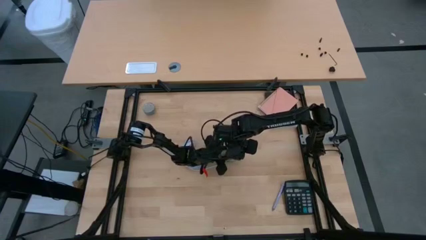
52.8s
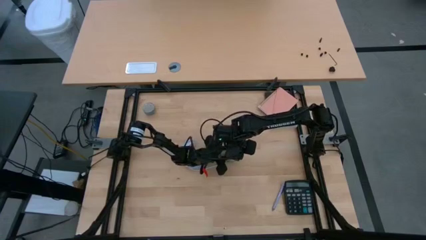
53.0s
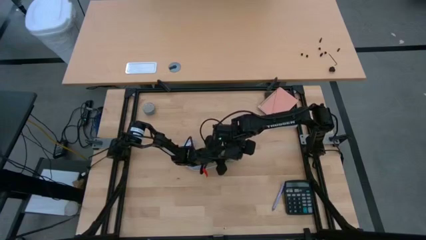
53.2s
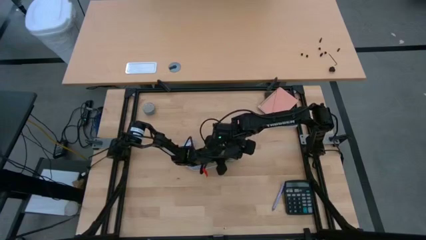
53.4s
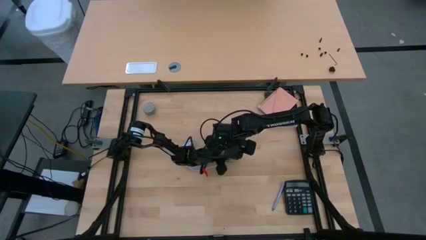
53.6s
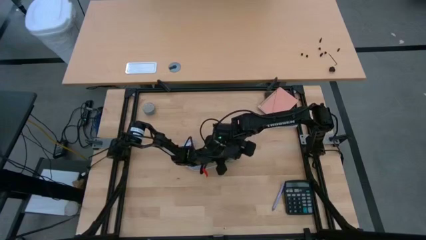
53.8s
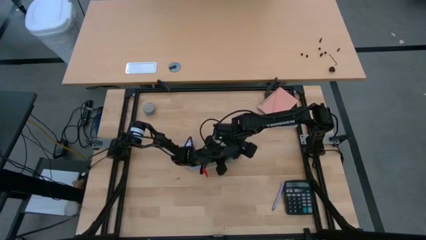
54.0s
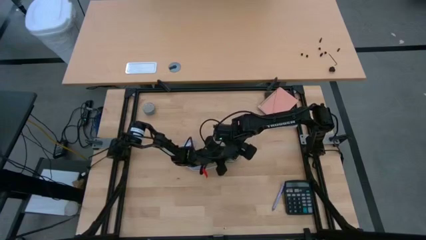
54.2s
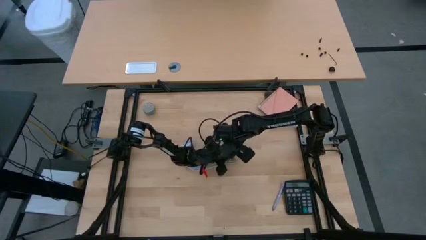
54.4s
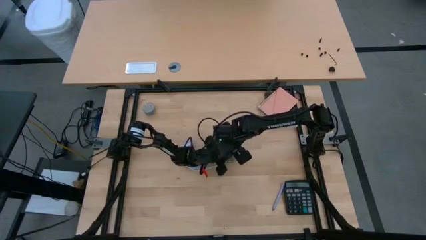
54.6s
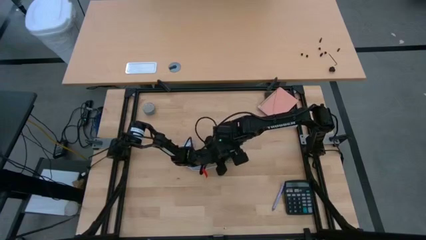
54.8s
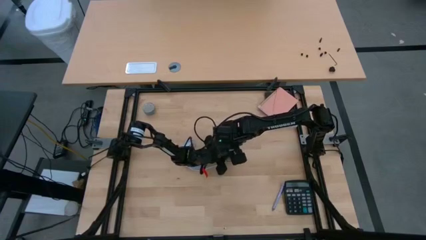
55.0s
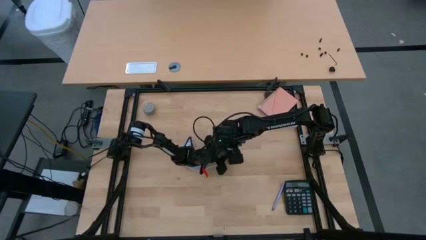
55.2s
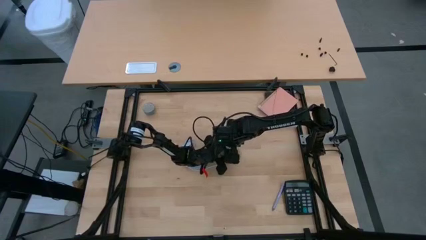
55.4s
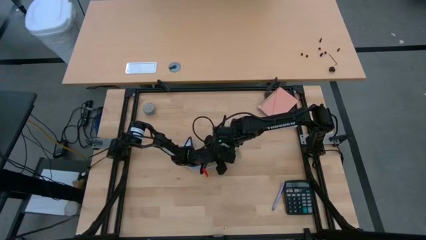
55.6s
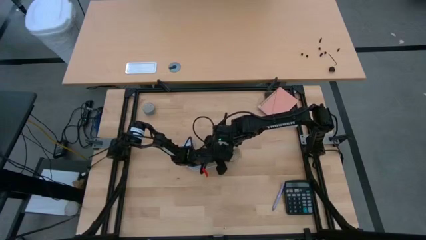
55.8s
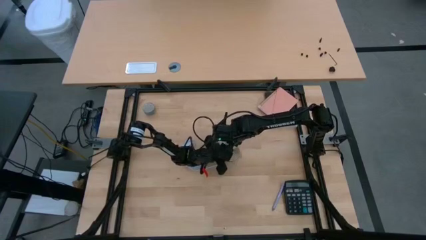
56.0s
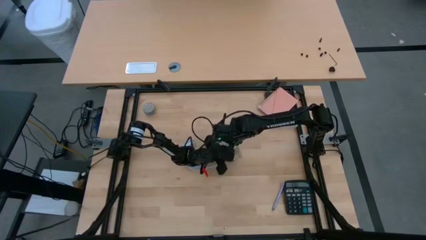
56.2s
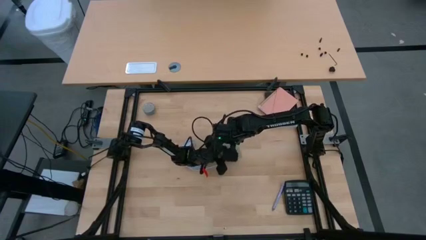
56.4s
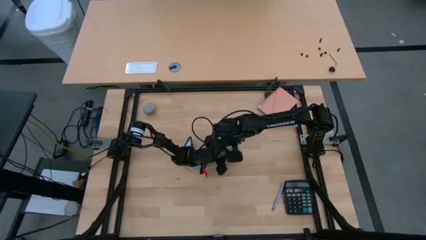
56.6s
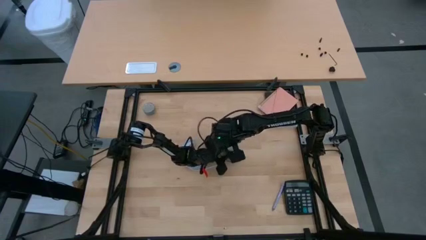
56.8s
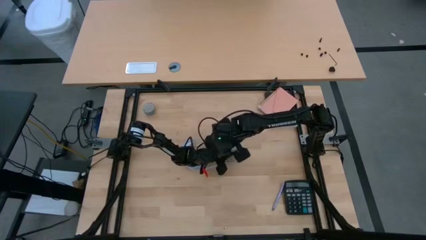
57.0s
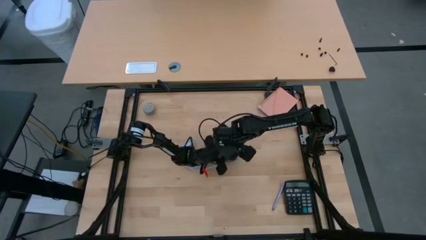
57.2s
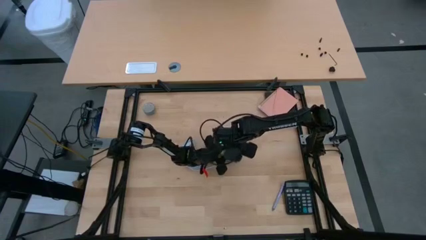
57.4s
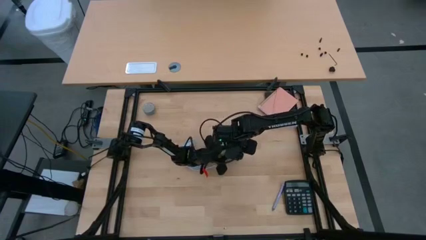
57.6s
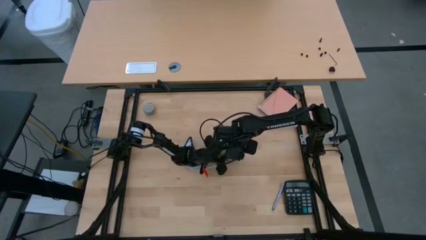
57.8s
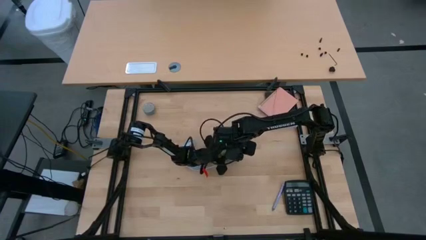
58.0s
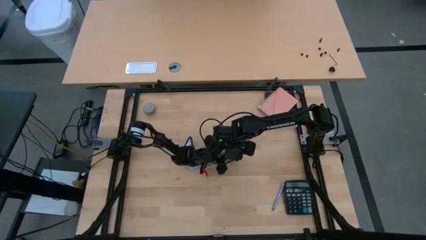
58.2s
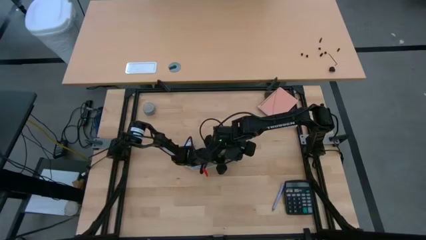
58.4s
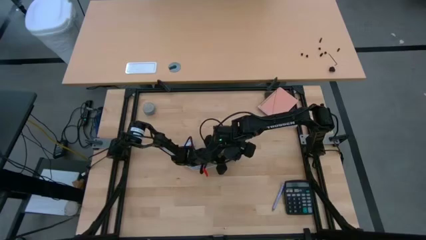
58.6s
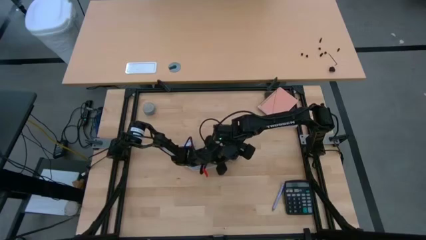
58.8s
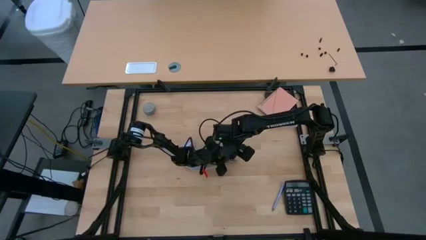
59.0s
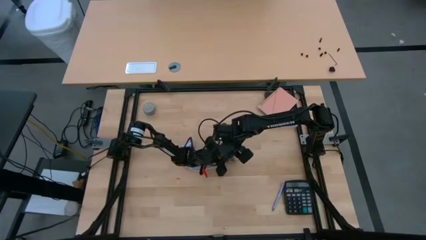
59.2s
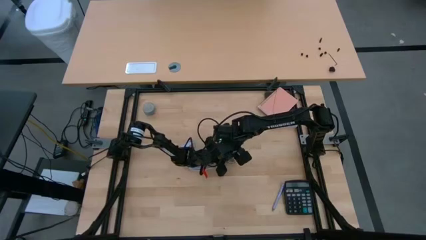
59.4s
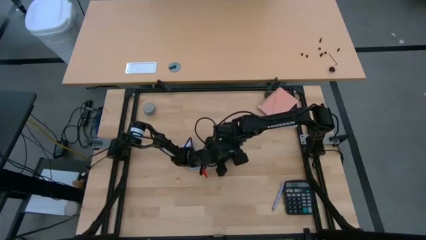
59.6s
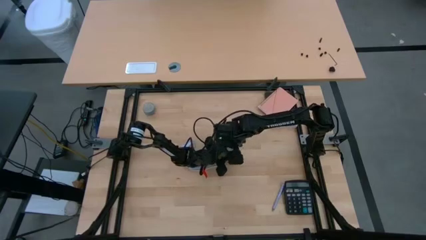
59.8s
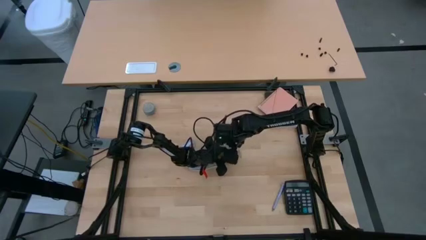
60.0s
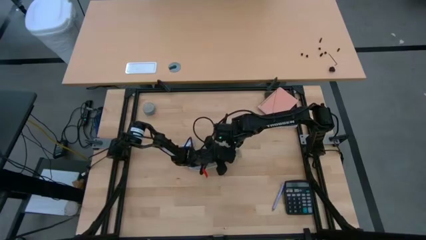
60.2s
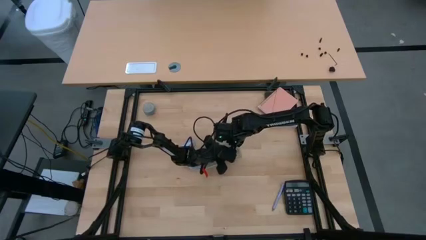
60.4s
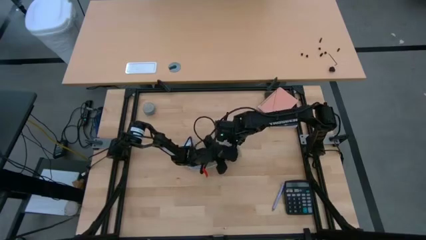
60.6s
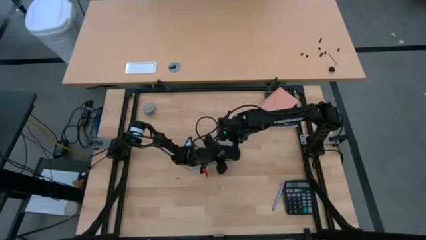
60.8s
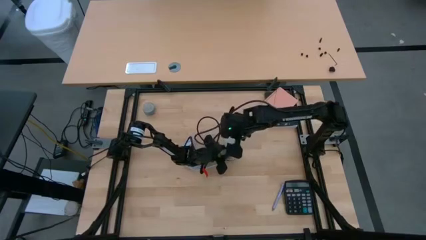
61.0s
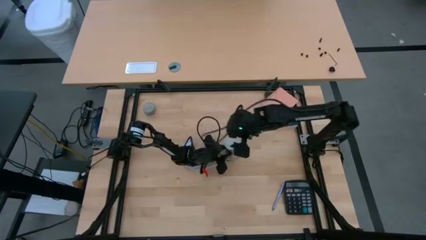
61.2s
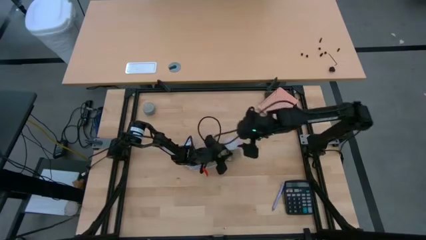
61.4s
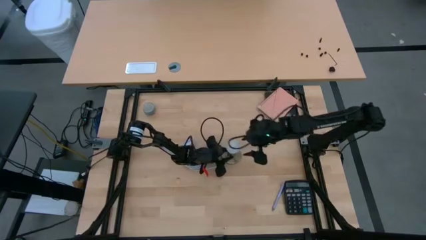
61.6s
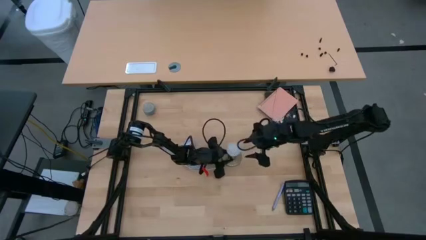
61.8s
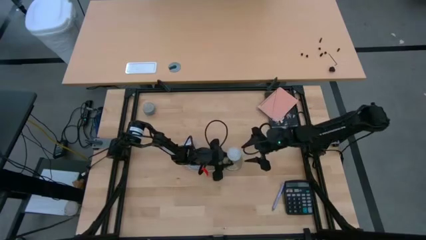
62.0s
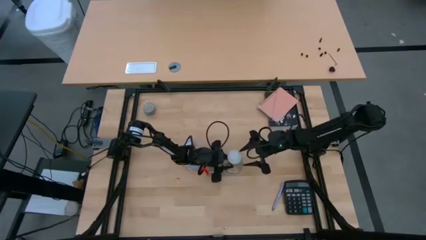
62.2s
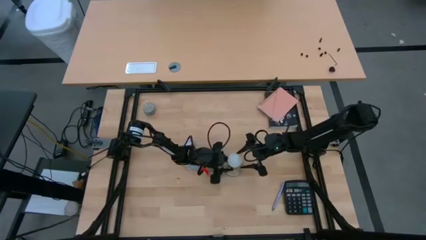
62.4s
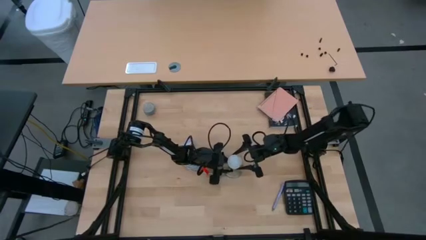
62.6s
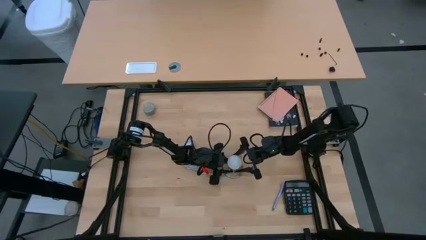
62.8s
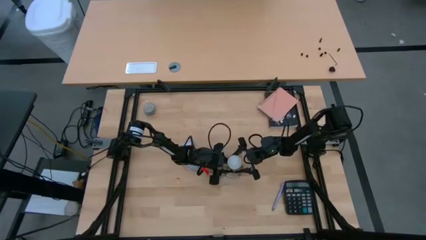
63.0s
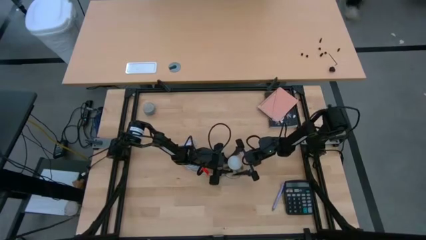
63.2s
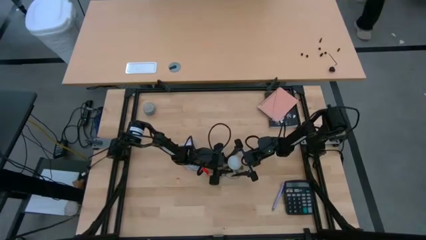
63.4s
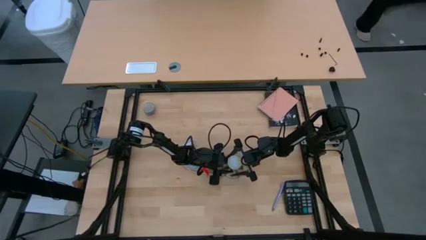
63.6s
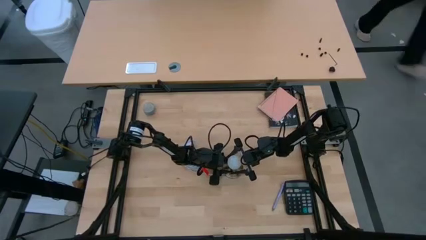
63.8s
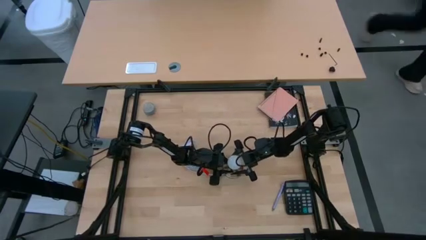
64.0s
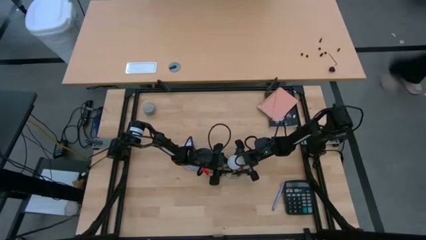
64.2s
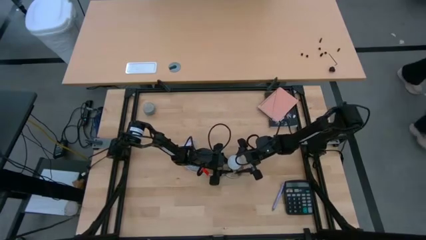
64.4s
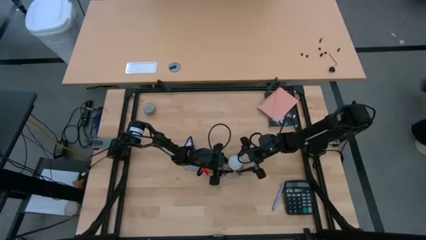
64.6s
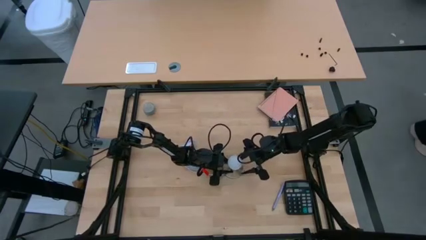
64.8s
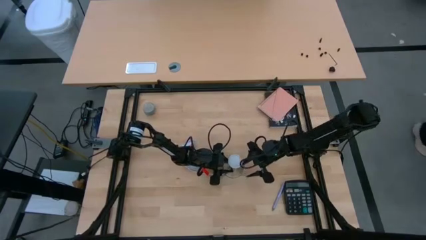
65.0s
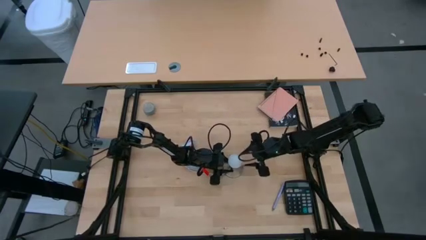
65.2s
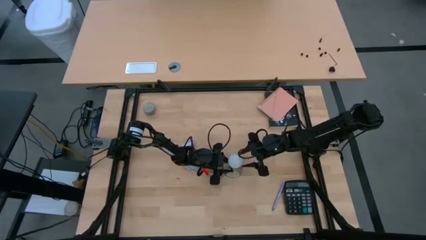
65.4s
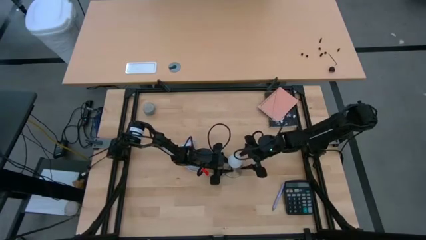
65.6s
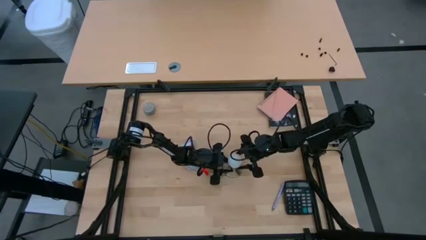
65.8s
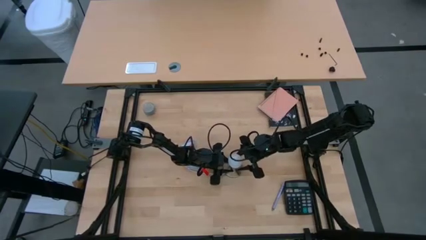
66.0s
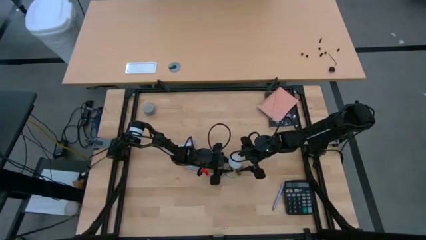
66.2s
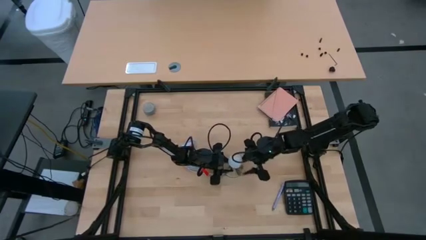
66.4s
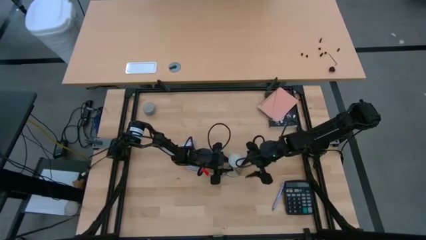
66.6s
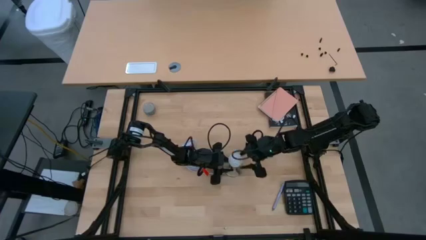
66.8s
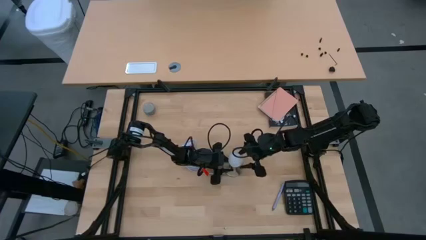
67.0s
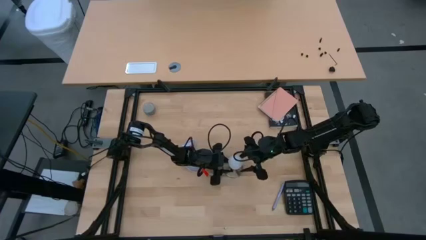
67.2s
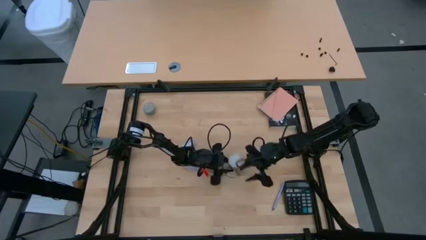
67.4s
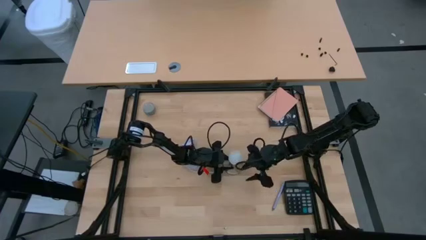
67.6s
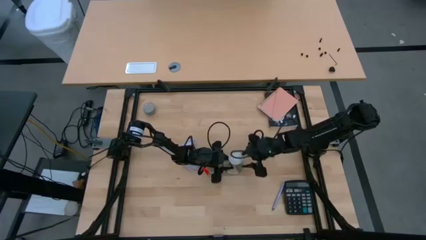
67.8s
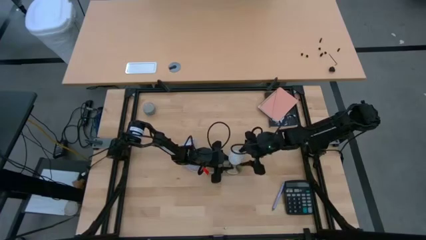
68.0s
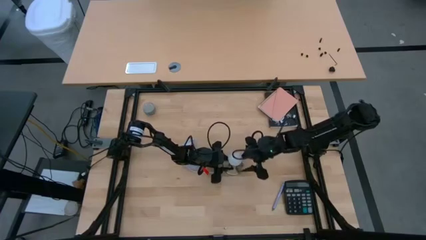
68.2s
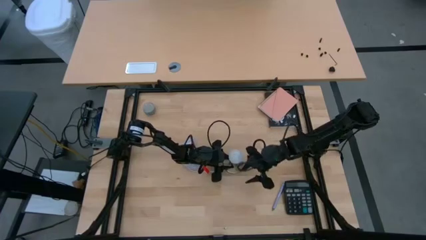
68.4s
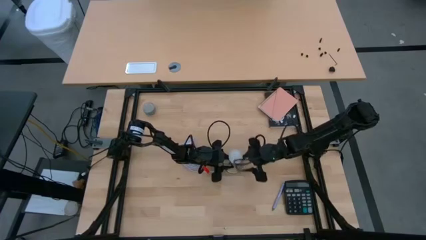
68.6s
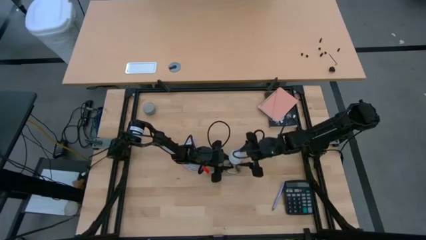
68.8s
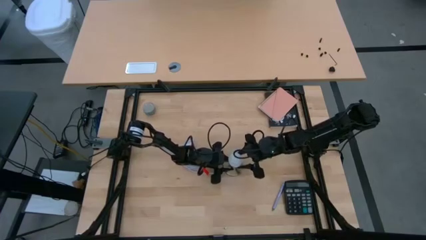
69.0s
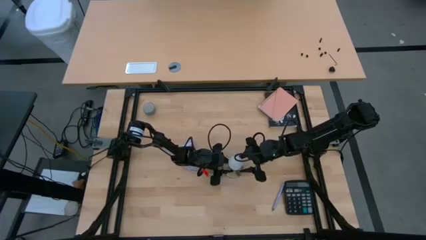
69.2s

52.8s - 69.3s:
Task: Screw lightbulb
Insert the lightbulb into the lamp
